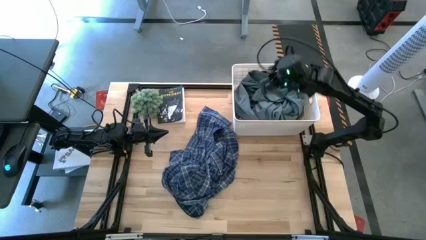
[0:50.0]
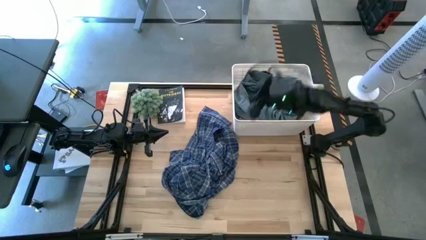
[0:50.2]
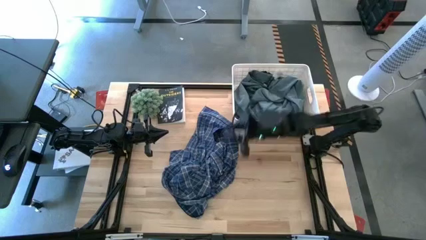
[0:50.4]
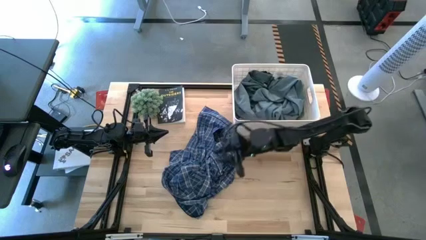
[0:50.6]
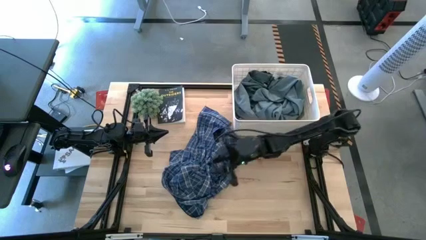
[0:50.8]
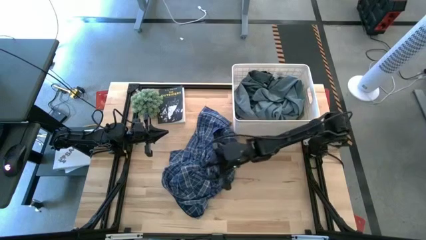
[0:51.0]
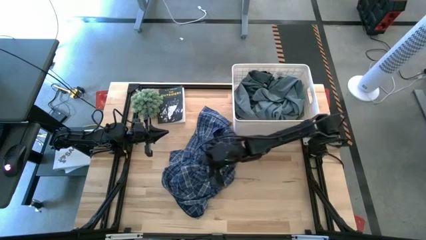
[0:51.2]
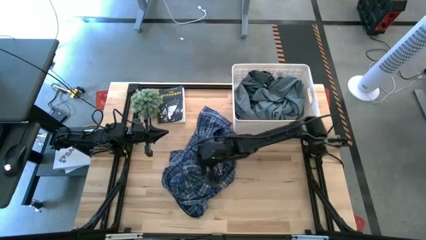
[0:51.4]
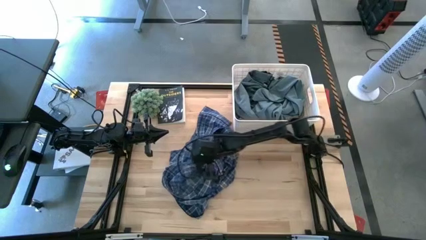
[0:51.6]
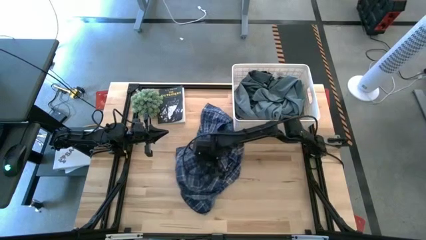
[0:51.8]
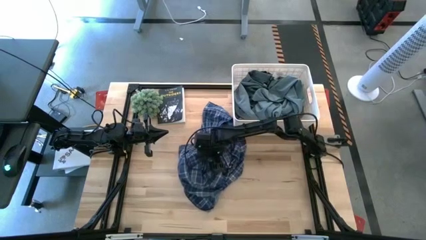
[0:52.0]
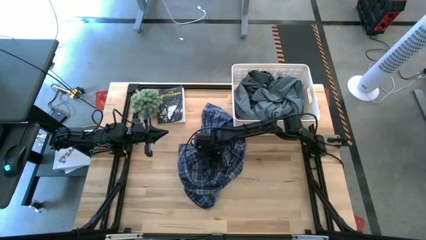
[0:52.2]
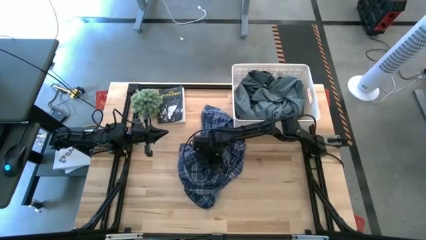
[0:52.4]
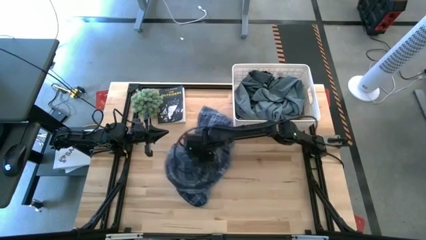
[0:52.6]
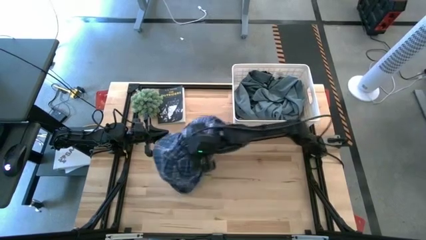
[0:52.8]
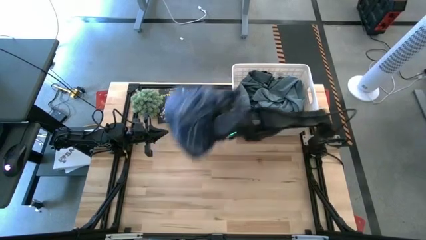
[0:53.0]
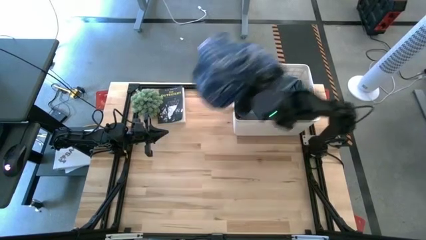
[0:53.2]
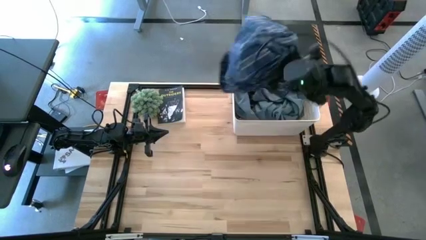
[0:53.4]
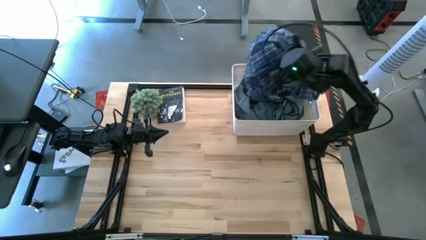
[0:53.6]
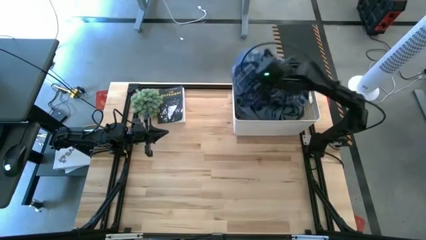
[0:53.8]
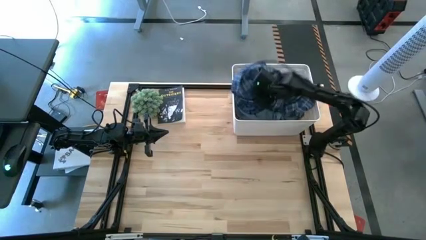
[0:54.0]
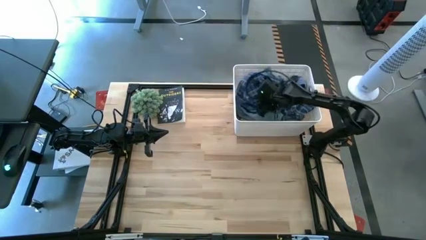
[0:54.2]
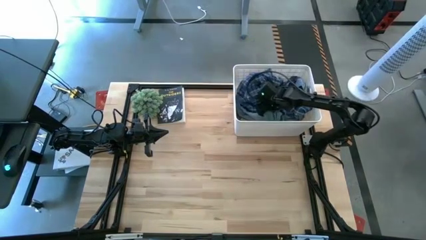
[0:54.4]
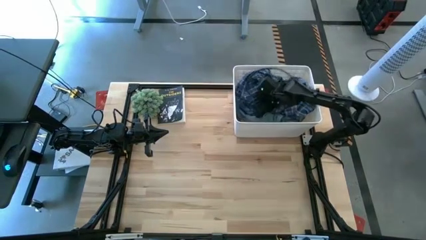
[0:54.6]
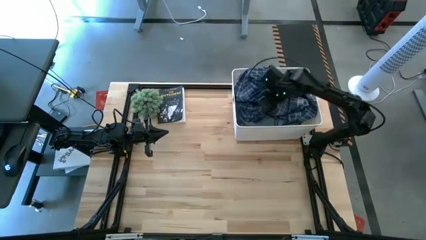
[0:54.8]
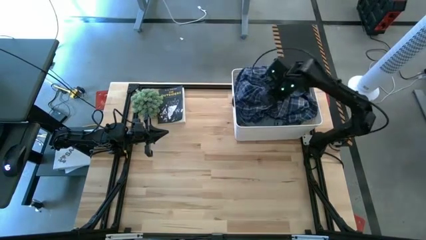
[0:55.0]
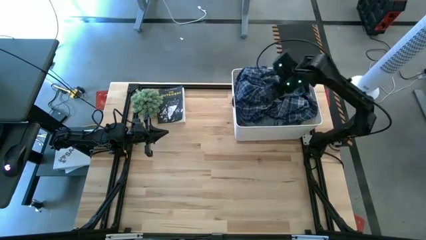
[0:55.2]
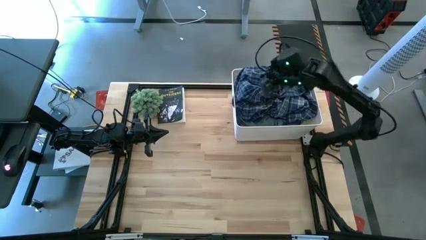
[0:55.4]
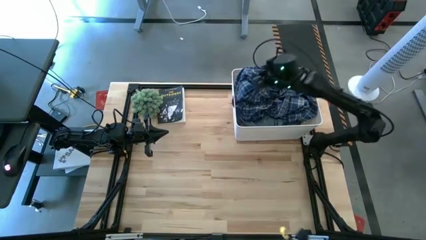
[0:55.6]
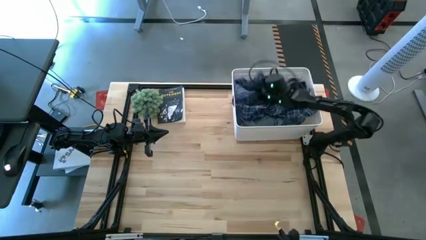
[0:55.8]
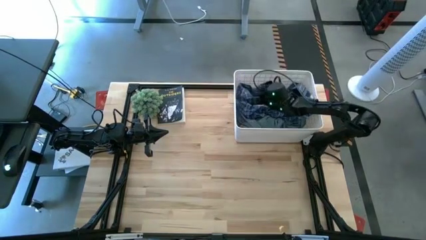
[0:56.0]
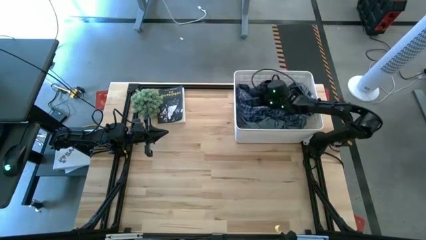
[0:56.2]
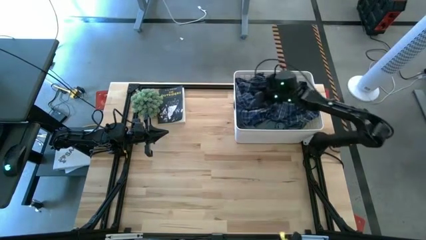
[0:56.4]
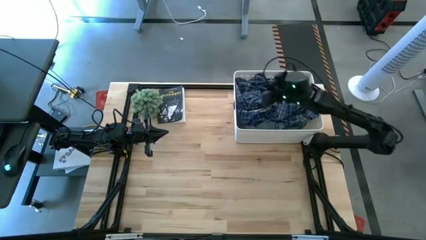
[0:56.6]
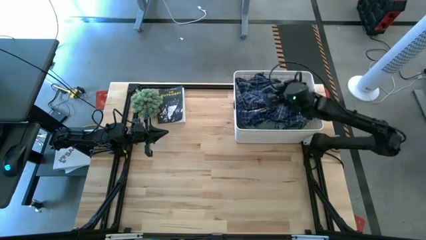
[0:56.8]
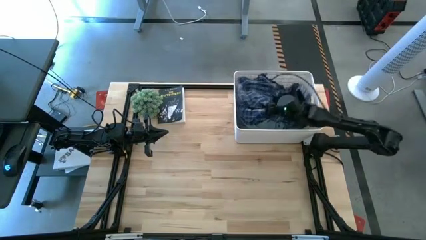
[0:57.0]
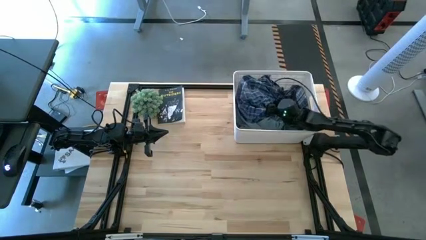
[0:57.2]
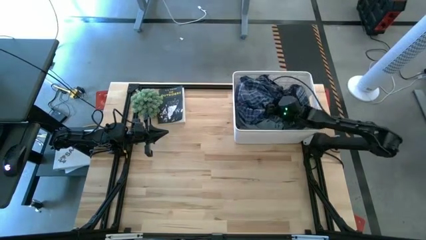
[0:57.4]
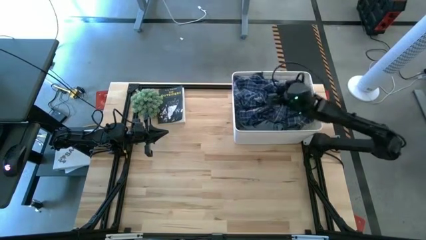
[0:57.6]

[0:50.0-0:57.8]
Task: Sort clothes
Put the blue polo shirt into the white laundry organizer

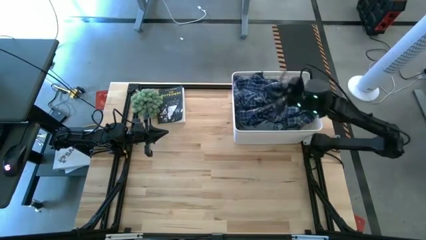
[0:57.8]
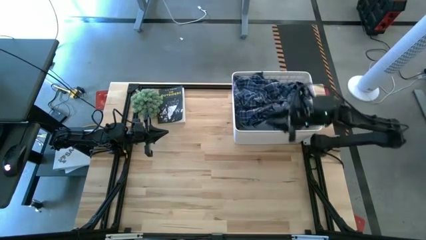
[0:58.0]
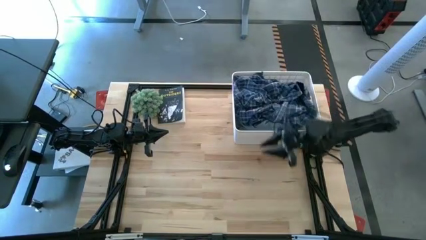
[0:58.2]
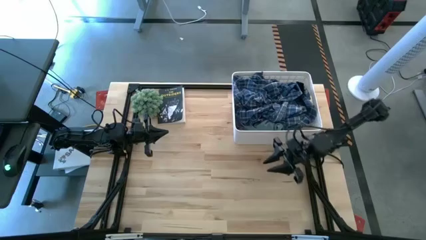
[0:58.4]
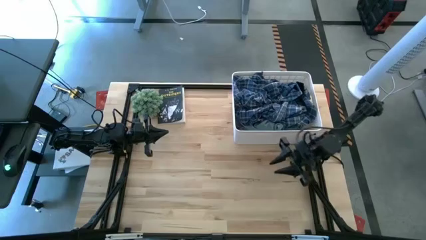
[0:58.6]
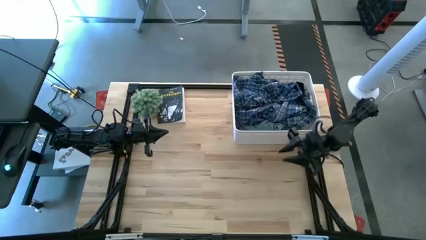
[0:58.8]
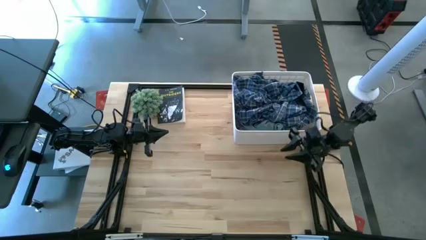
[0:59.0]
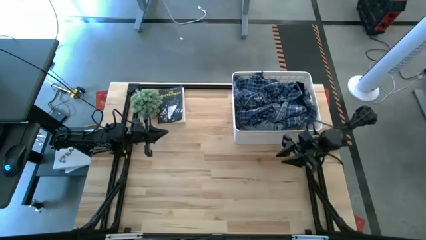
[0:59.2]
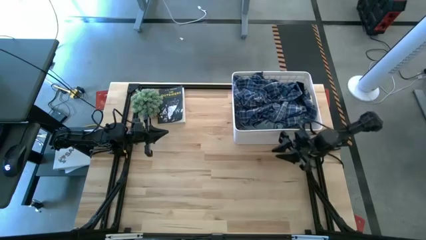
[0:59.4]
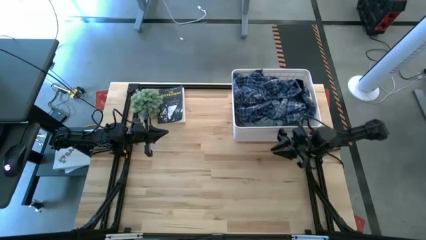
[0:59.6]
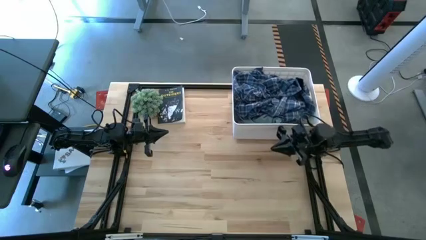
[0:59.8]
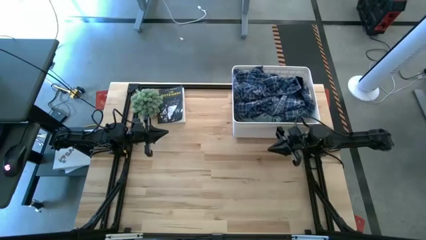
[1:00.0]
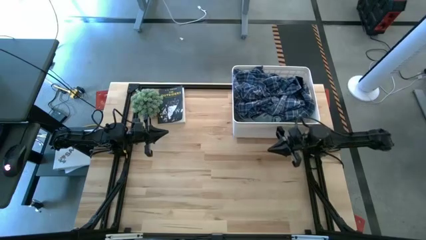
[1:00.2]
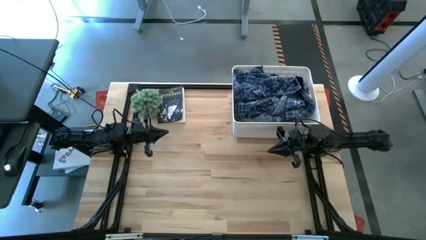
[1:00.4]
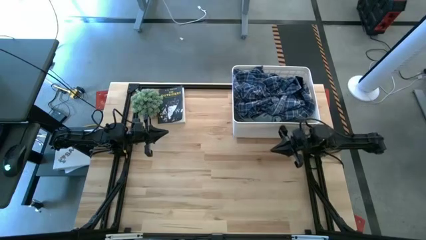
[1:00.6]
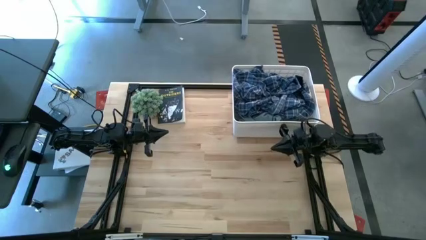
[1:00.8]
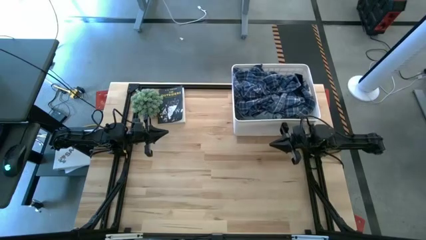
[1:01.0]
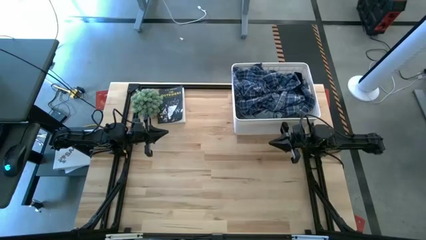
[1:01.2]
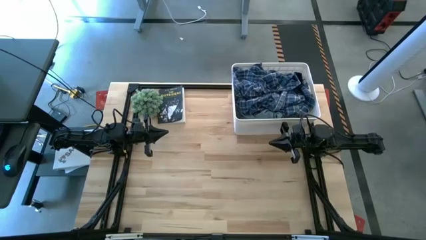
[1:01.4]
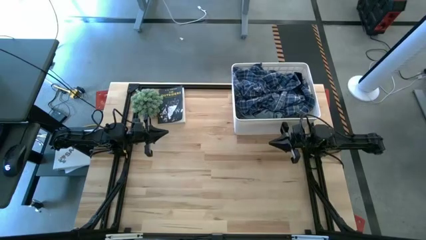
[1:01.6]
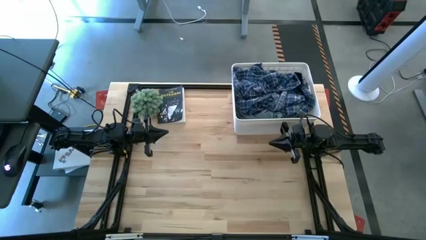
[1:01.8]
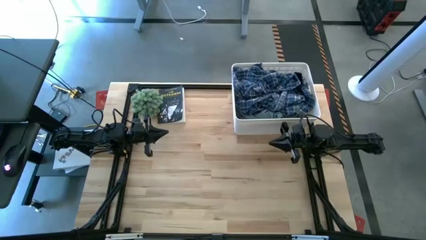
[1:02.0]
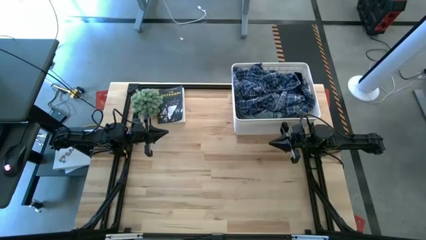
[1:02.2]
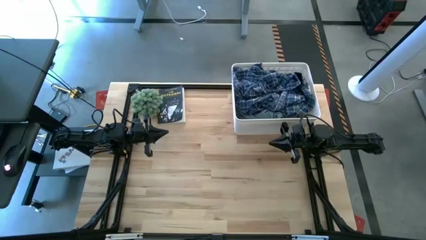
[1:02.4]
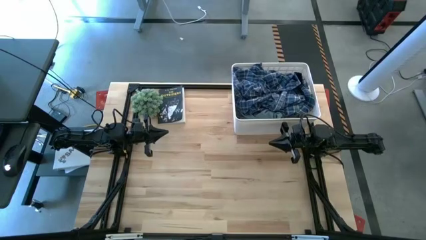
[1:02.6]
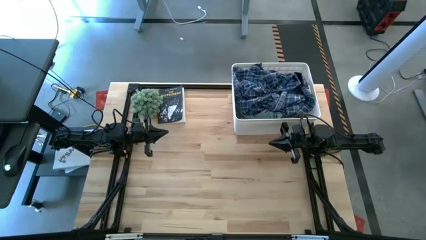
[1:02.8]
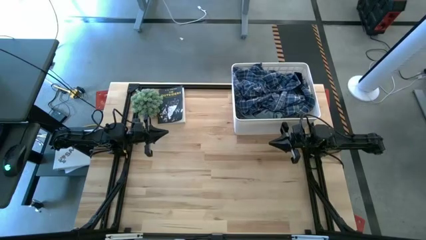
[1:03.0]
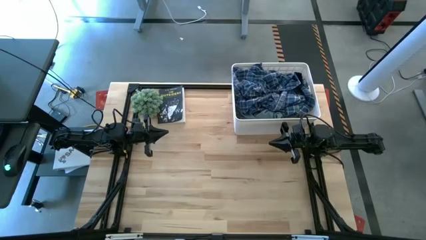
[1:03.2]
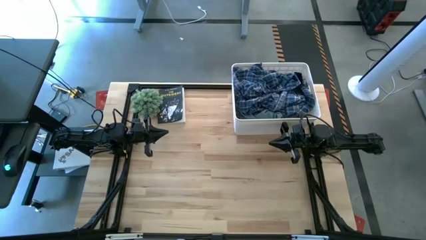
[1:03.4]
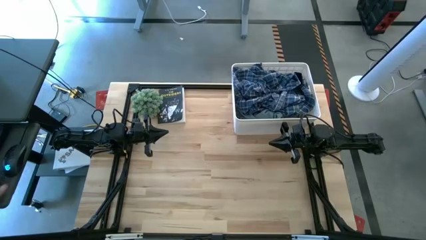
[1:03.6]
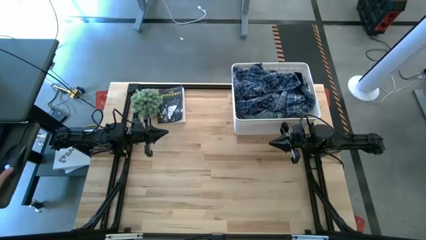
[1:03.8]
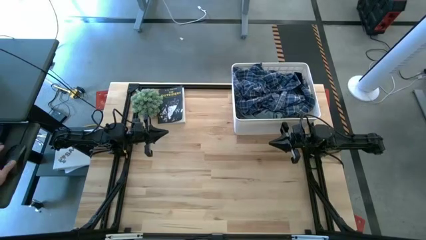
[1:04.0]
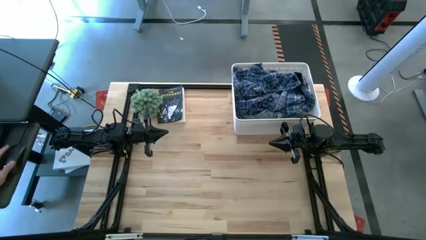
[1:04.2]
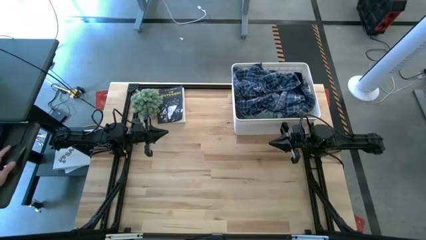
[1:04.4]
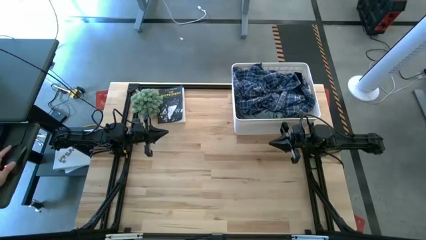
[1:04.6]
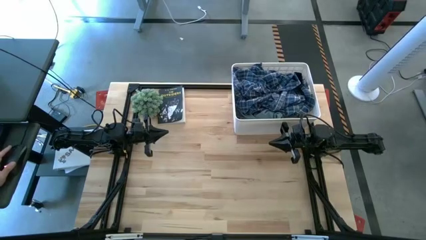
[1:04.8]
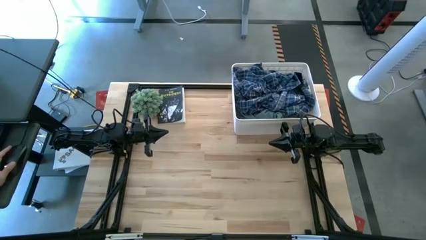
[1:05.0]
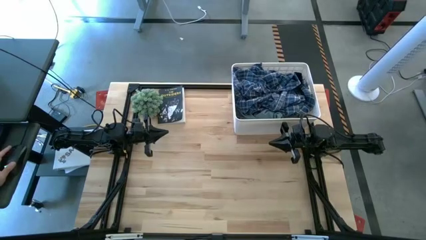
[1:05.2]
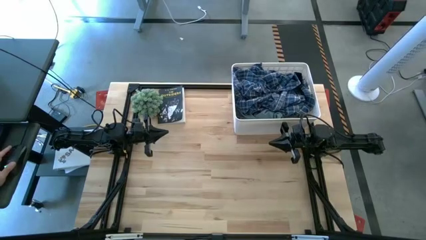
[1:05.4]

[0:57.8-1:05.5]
Return to Home Position
